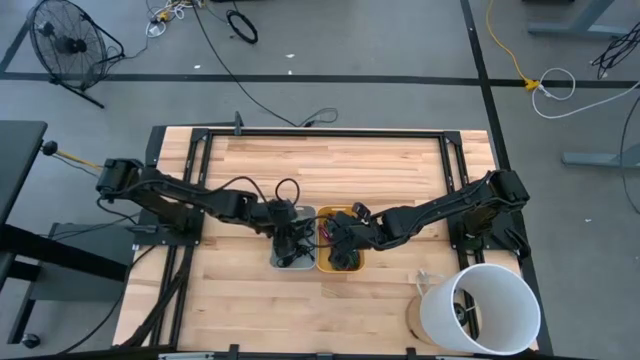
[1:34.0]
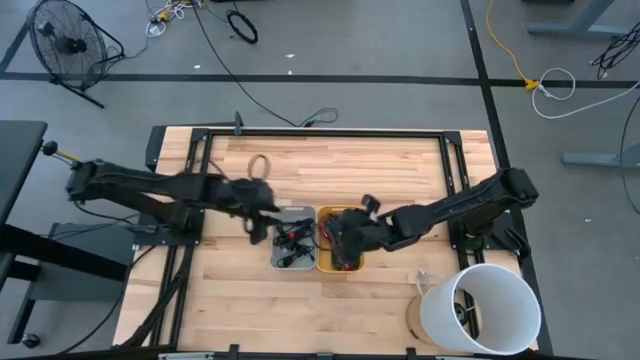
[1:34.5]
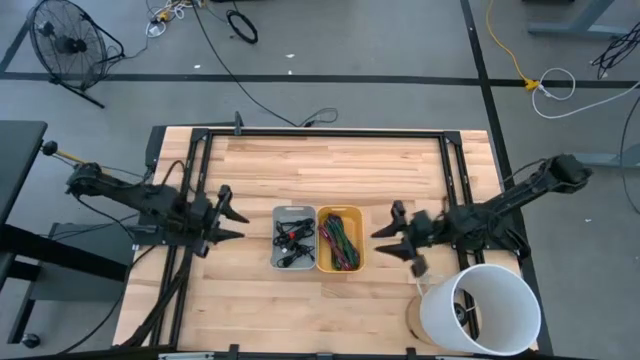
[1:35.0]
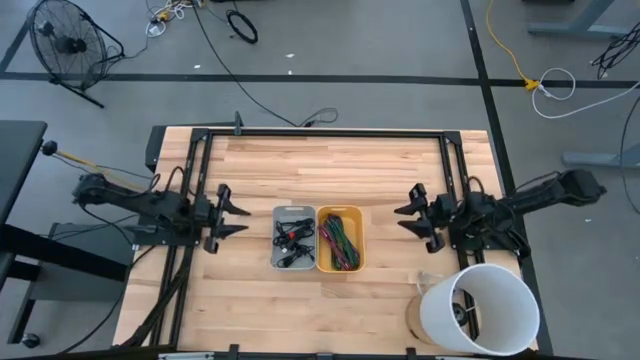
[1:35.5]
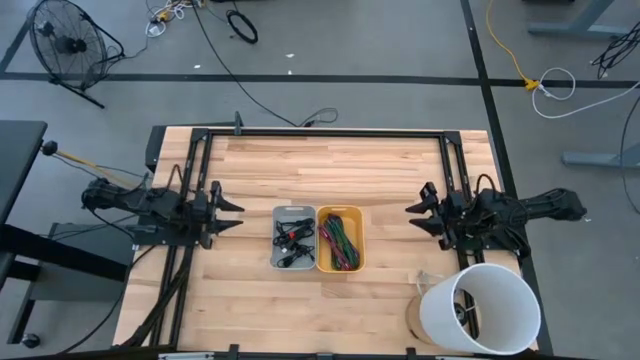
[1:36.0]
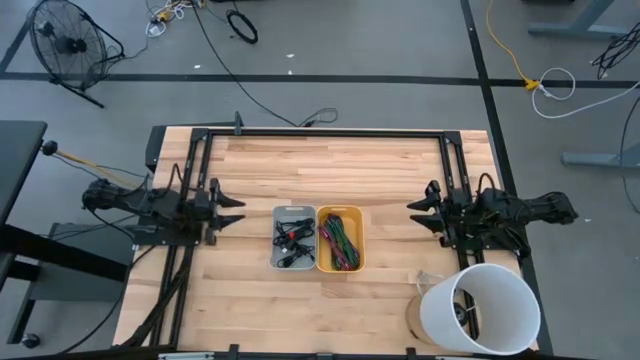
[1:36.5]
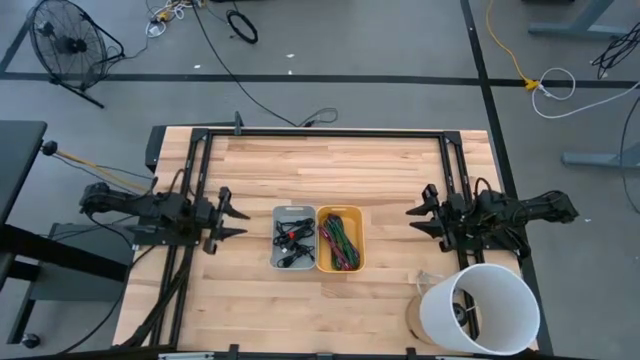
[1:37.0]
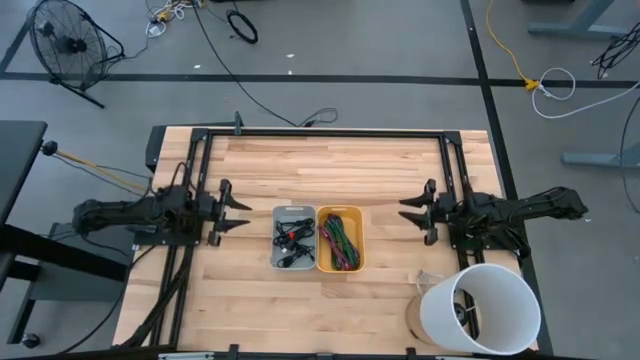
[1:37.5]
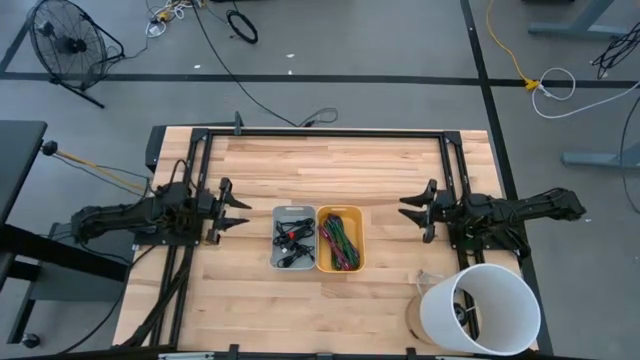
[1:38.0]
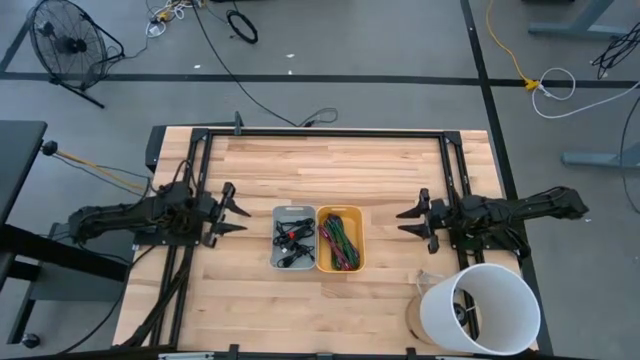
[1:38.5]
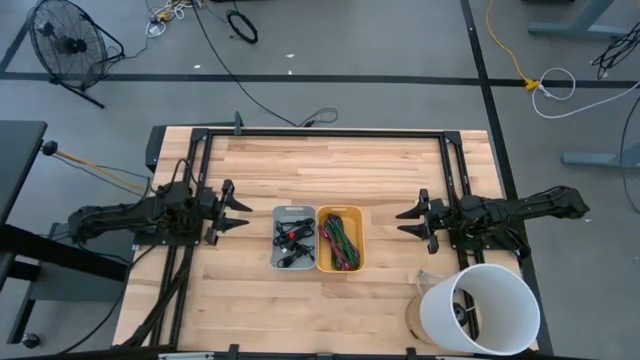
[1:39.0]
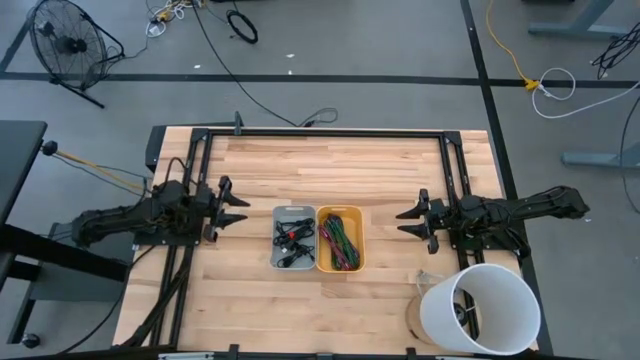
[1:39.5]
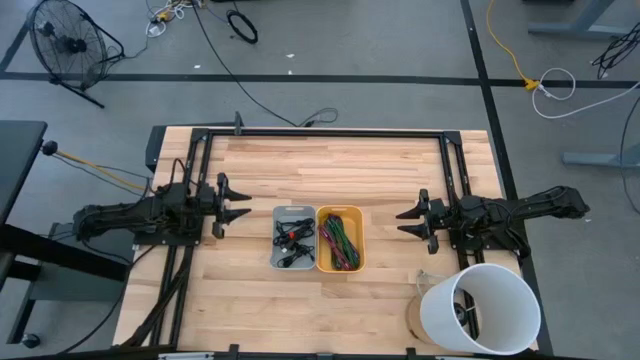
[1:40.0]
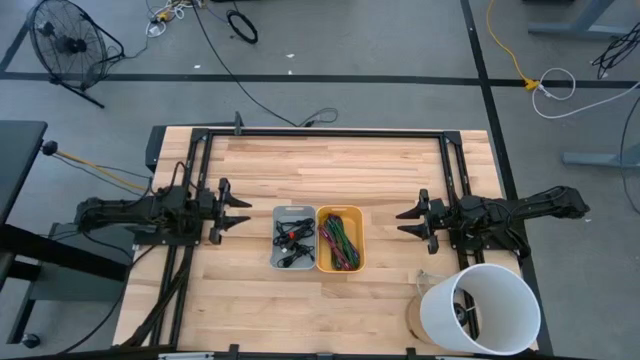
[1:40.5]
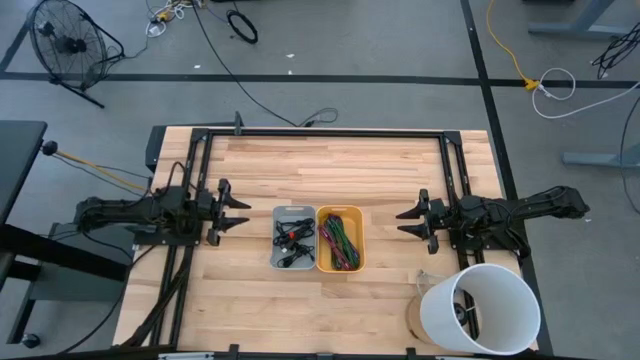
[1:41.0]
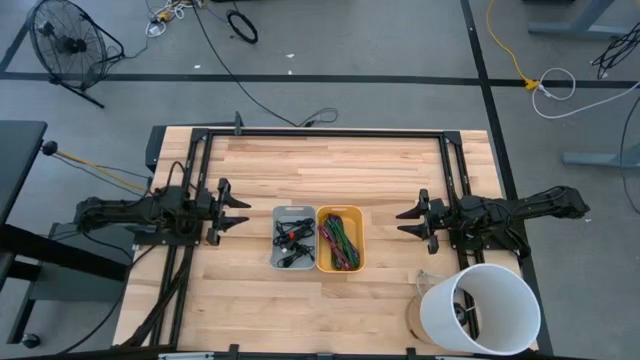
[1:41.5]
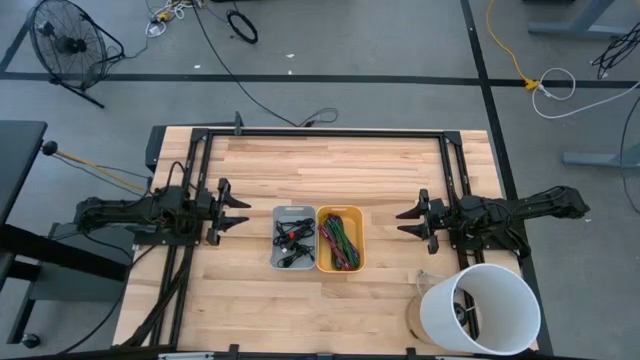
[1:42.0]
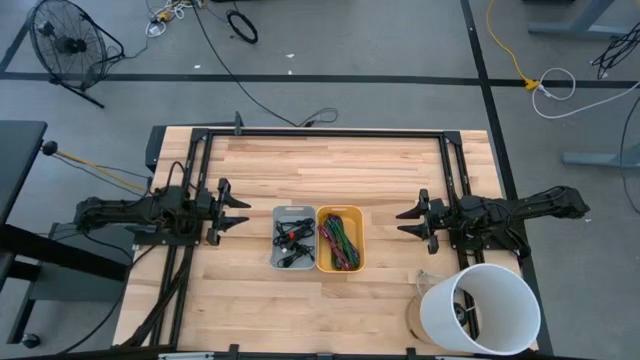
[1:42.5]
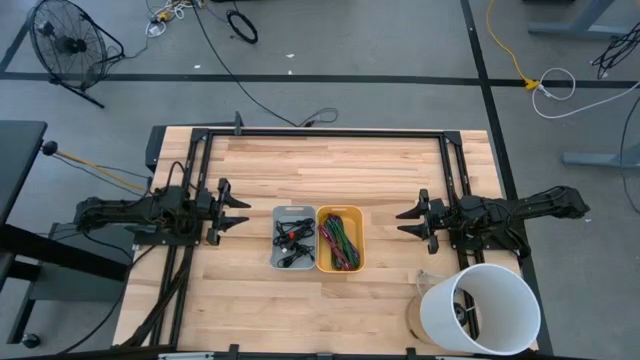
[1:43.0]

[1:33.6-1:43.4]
Task: Pick & Place USB Port
Return to Home Position

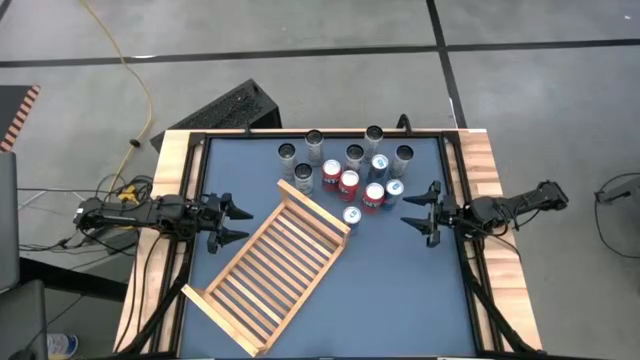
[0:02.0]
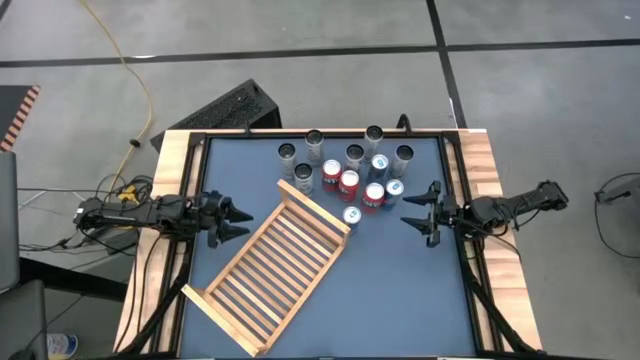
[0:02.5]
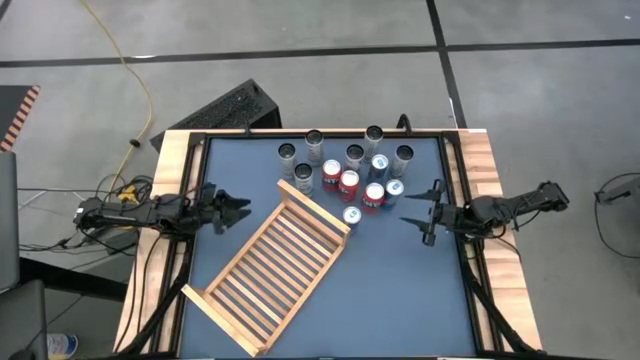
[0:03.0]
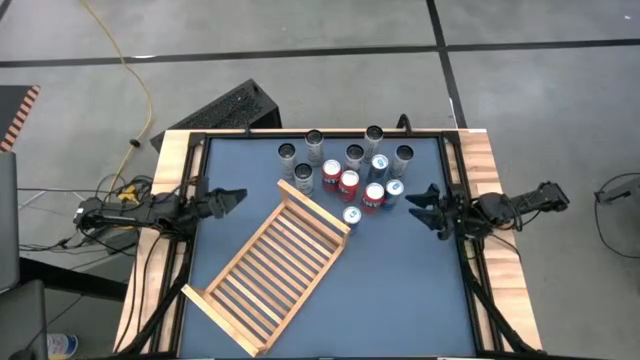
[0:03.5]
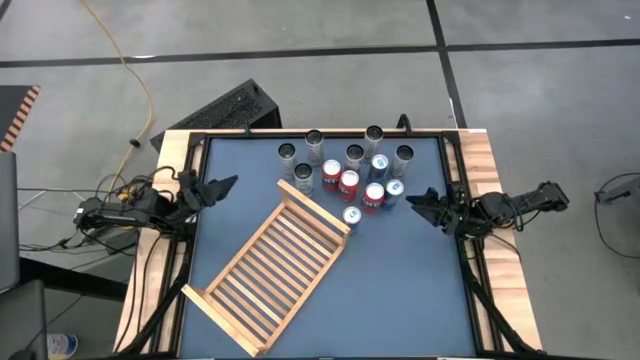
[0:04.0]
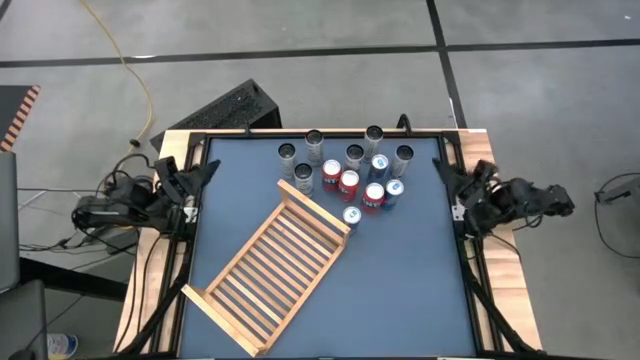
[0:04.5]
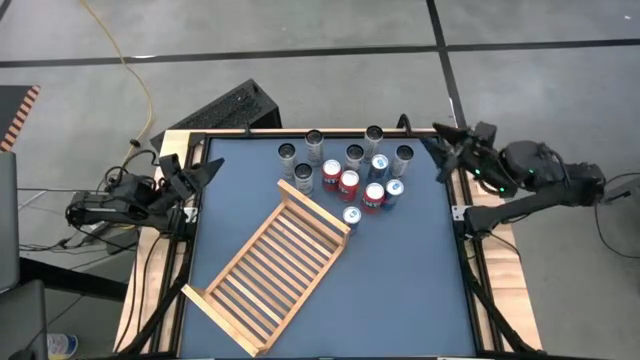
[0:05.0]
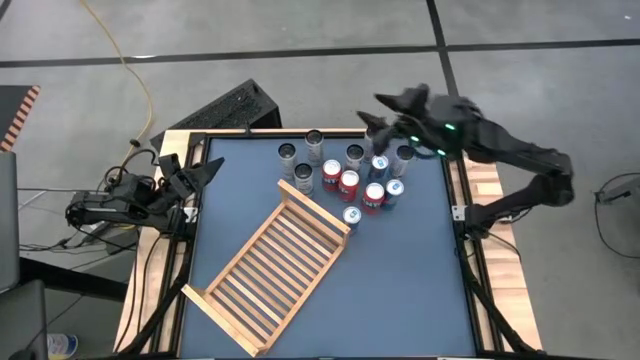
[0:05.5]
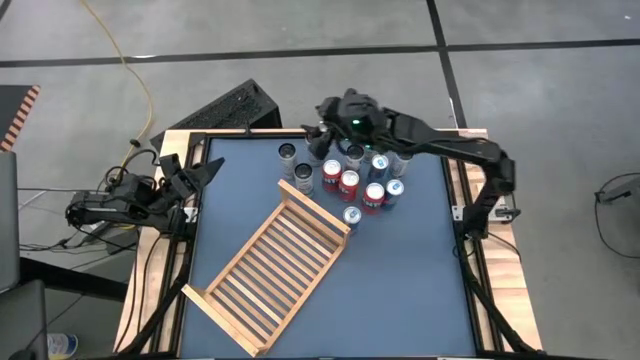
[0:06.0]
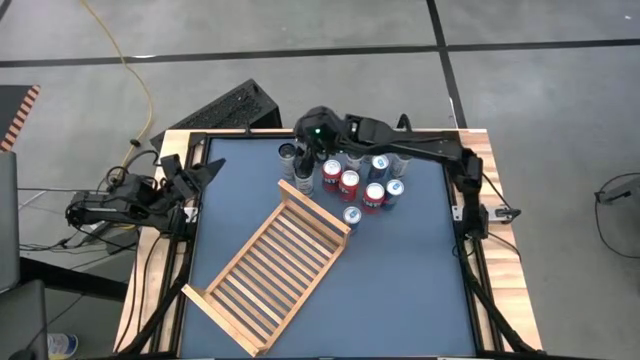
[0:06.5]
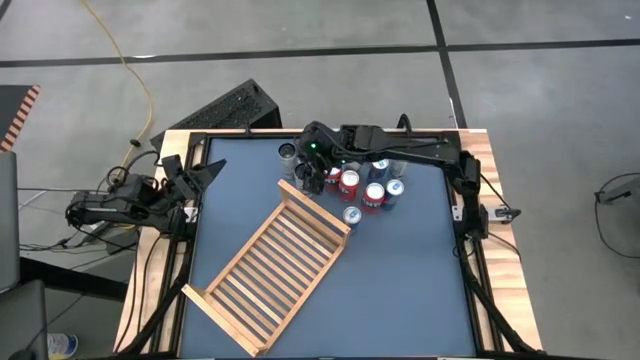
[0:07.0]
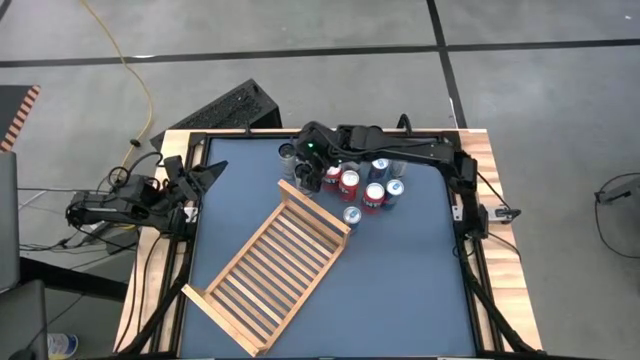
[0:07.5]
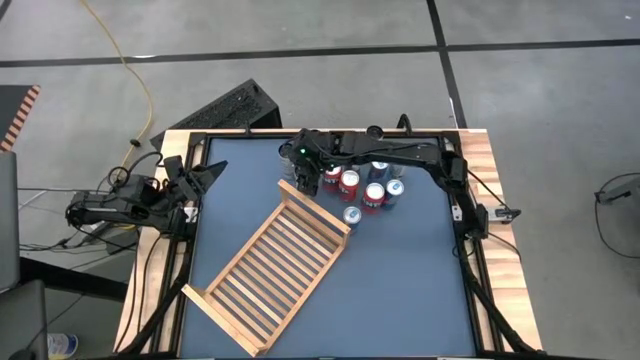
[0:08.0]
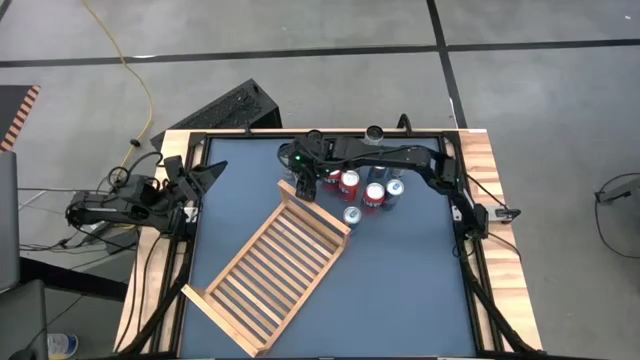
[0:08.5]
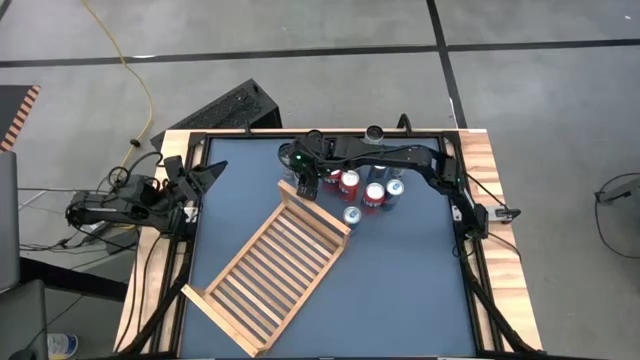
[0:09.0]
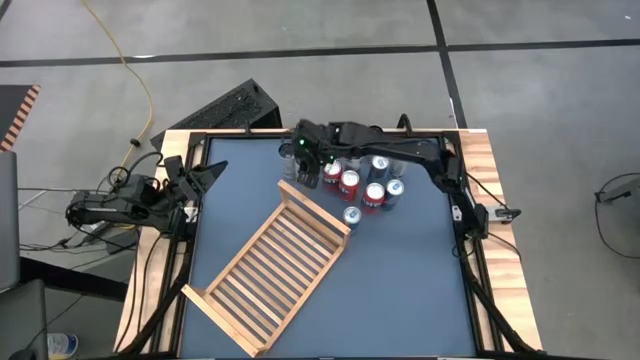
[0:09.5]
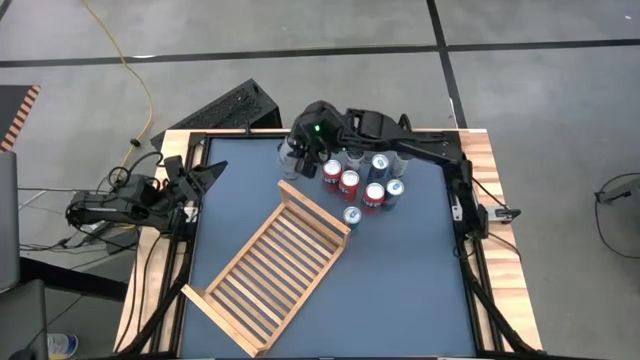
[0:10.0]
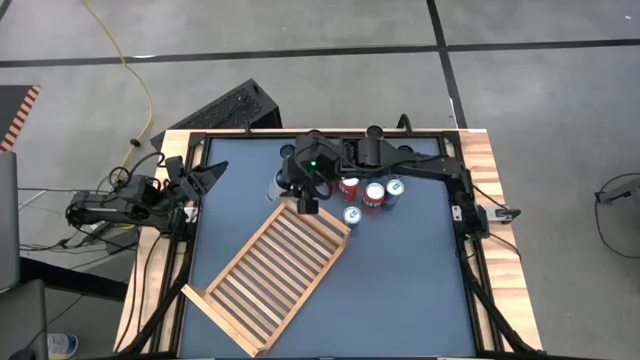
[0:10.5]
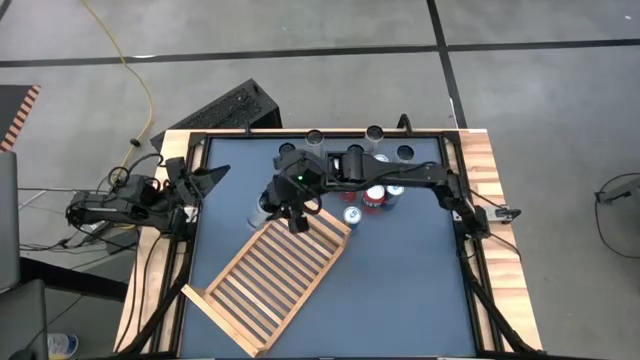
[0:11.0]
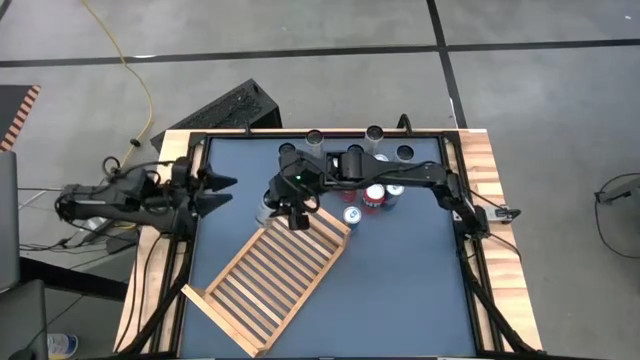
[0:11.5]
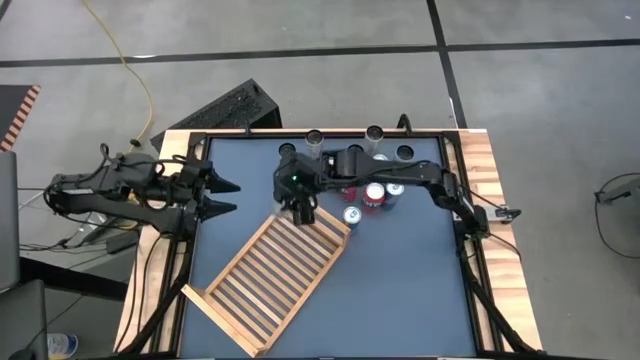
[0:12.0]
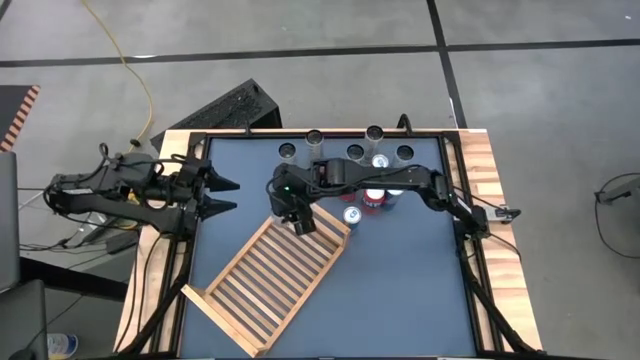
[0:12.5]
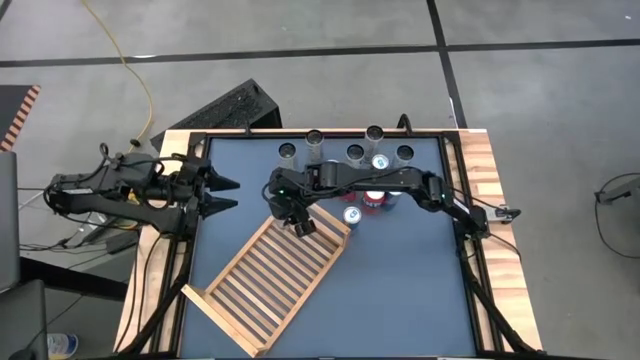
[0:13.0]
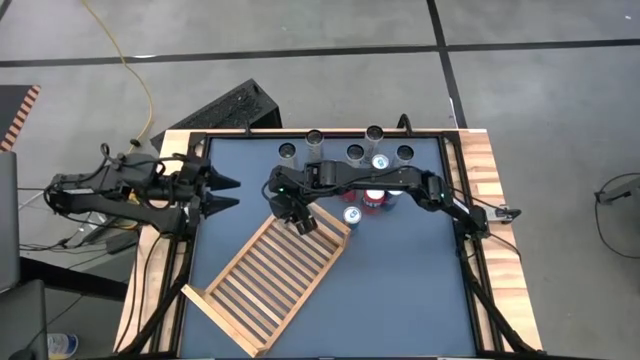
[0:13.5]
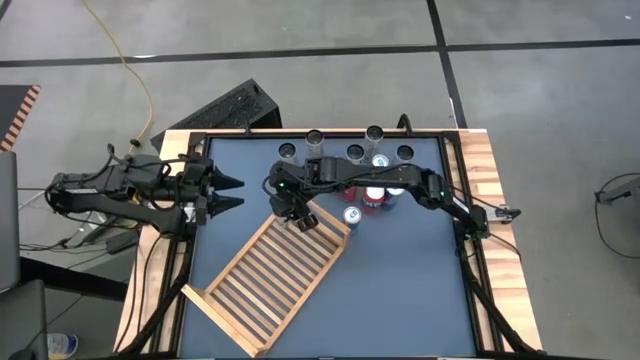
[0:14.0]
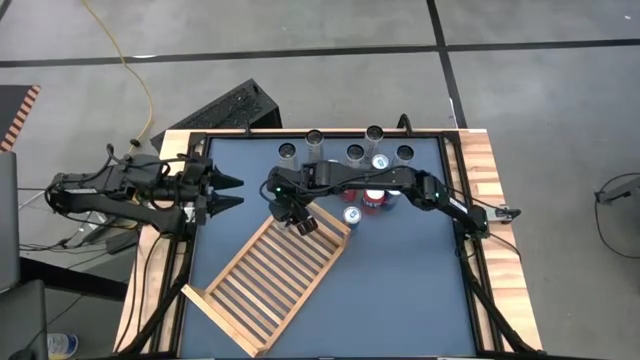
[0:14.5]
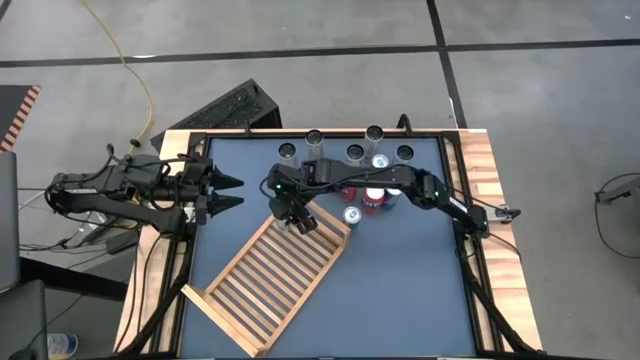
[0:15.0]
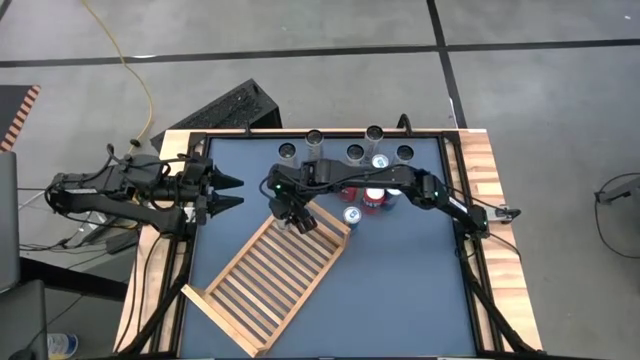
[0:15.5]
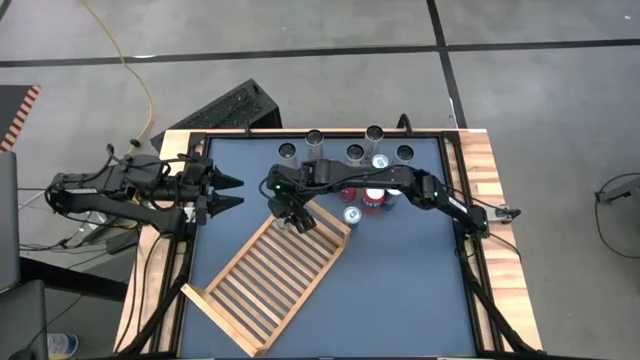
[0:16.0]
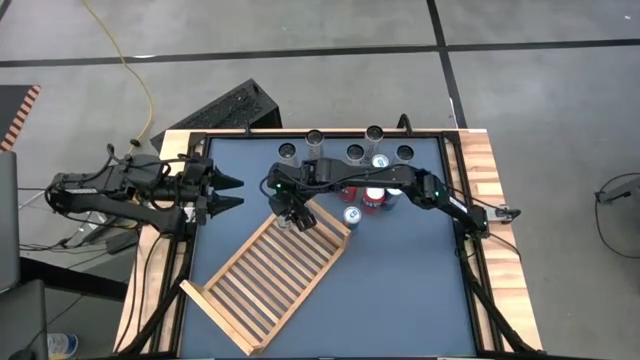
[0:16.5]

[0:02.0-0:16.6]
Task: Place canned beverage on shelf
Put the left white blue soda can on the shelf
